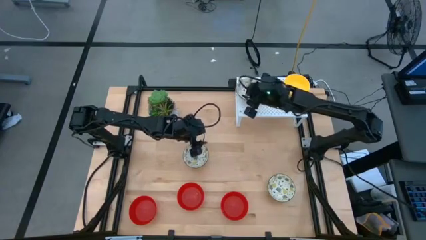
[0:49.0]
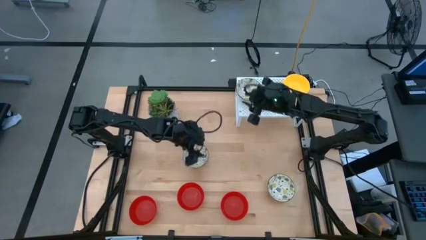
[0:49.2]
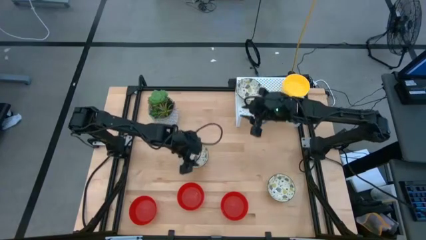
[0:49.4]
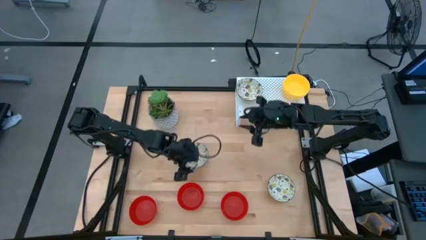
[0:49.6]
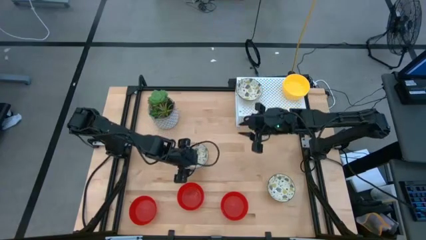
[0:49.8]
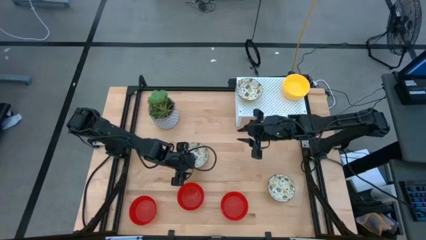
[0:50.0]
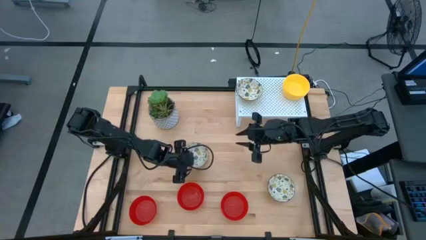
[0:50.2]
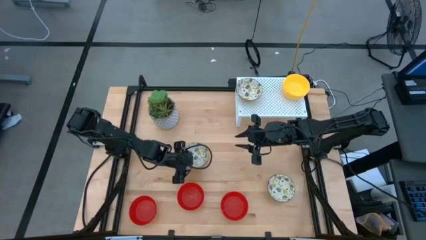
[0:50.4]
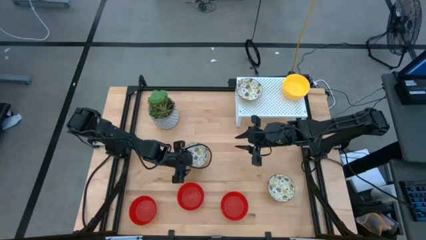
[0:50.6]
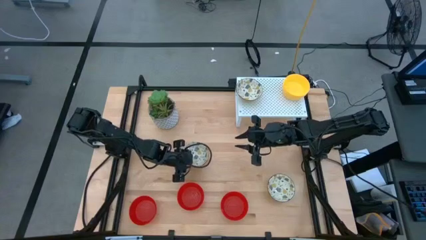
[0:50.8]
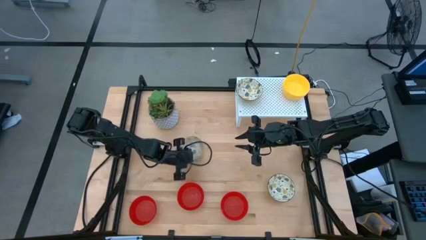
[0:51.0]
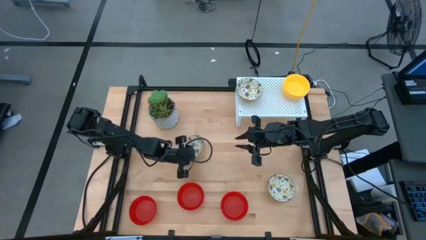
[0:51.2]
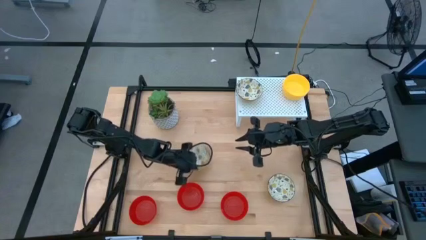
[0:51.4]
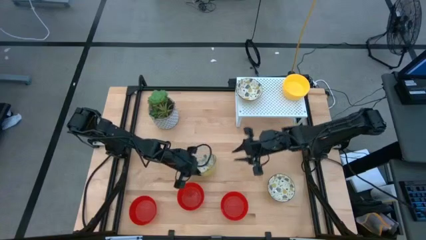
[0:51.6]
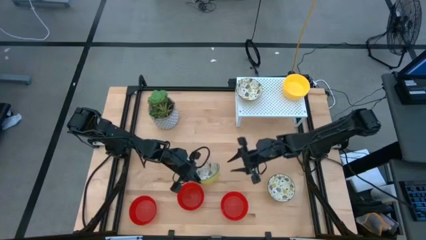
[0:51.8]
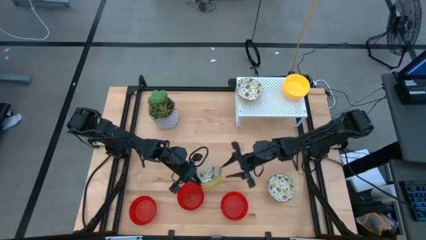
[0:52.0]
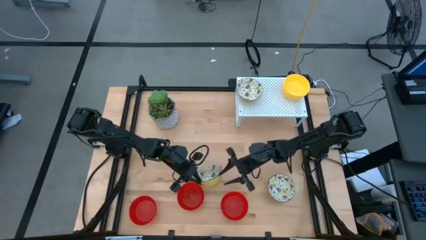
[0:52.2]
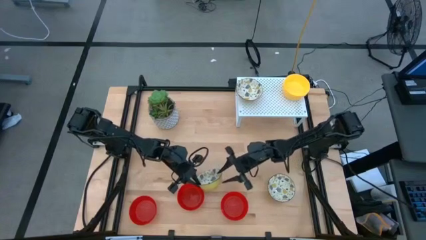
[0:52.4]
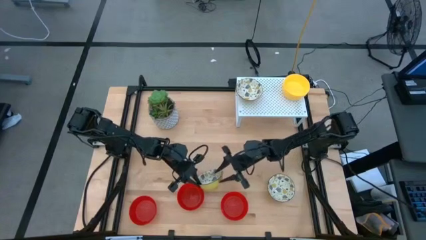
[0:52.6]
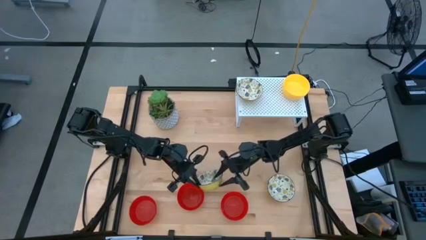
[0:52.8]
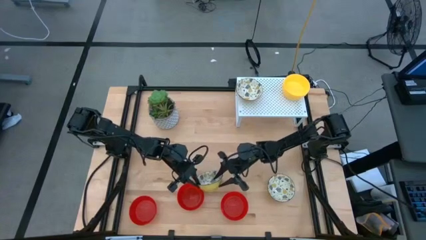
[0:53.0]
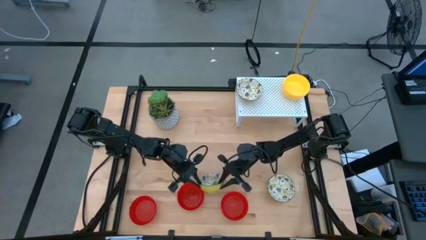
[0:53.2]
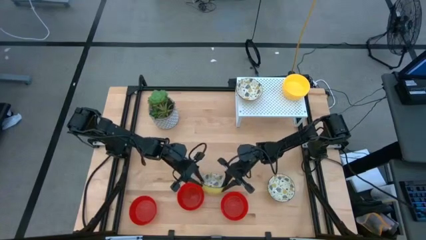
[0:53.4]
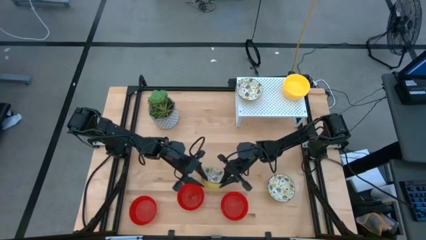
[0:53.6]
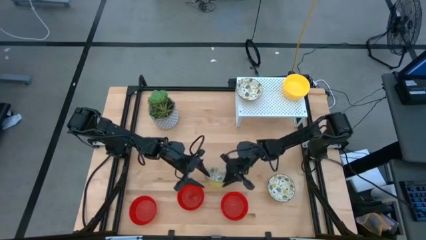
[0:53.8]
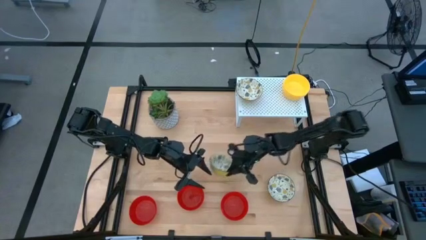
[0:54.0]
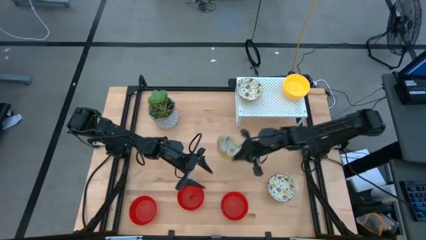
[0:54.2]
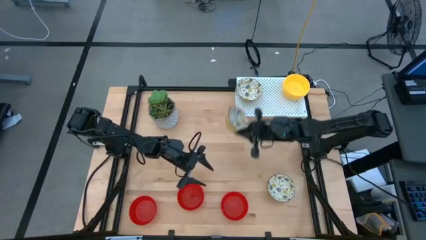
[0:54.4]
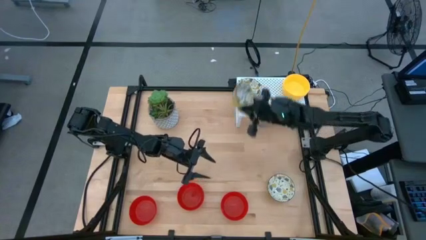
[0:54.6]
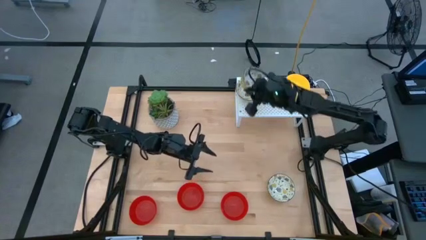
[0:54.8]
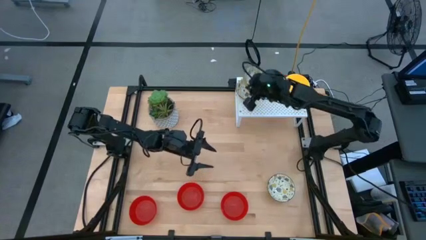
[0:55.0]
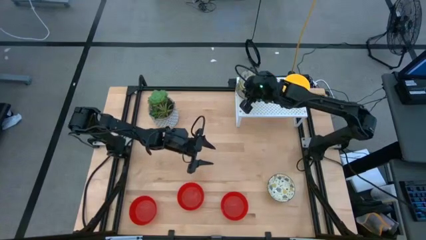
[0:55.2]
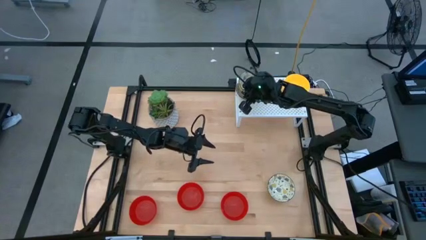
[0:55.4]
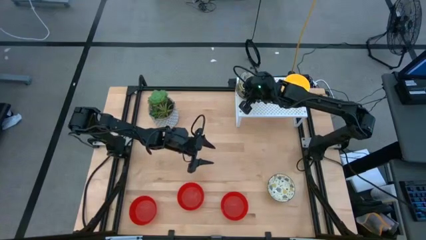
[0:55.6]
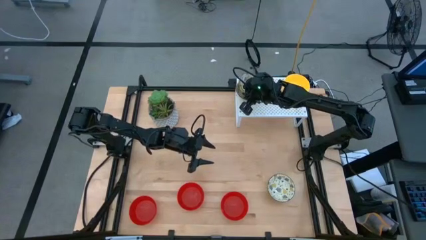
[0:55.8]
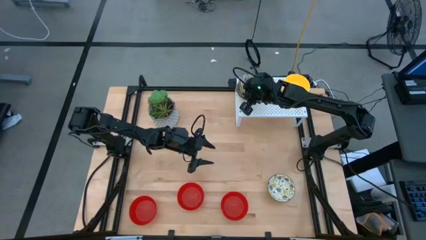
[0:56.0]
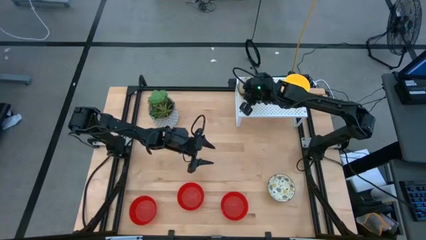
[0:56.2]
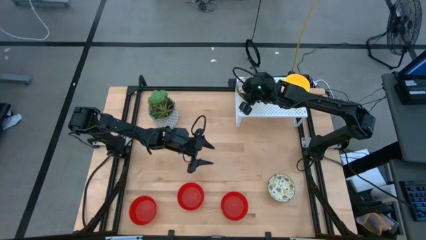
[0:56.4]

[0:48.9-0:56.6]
Task: Pick & Place Mini bowls
Stack the white patterned bowl on the white patterned bowl on the shelf

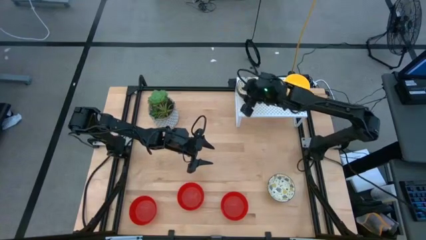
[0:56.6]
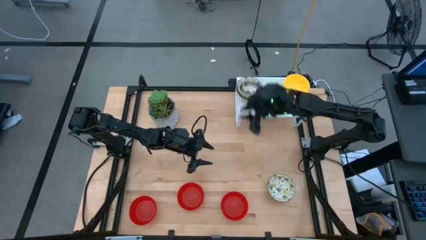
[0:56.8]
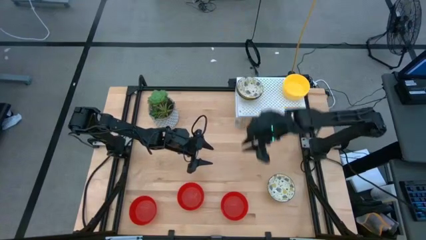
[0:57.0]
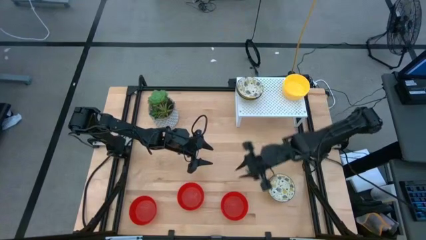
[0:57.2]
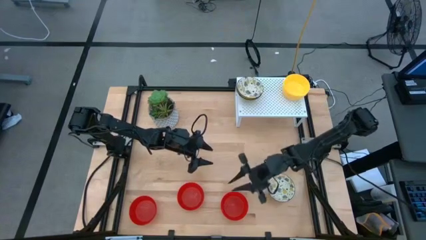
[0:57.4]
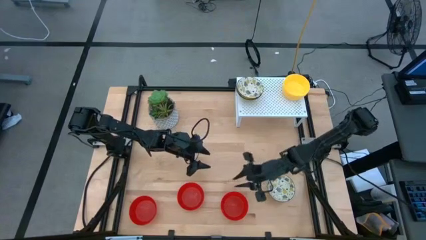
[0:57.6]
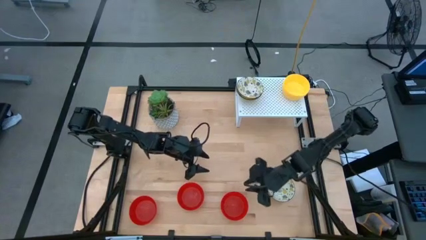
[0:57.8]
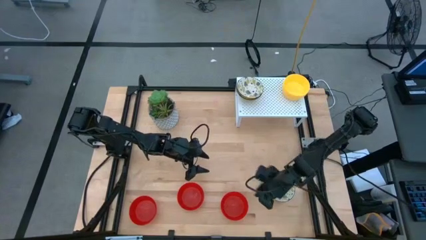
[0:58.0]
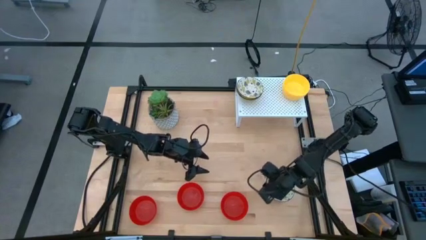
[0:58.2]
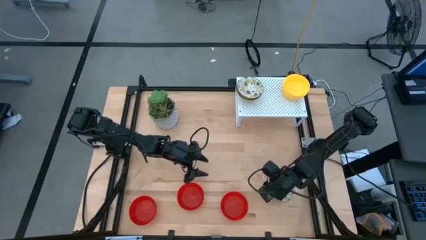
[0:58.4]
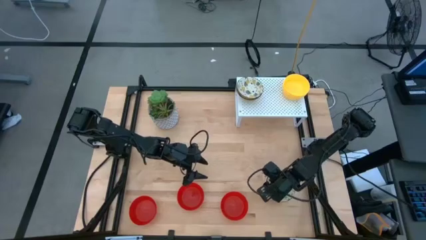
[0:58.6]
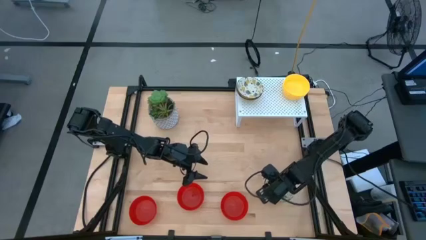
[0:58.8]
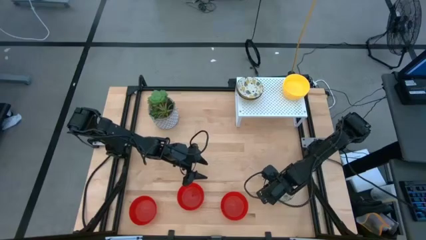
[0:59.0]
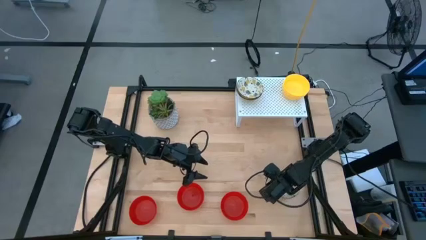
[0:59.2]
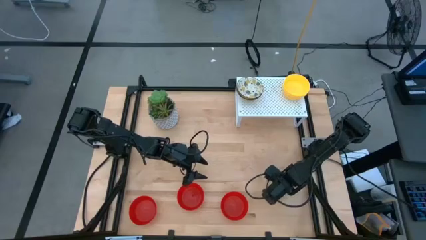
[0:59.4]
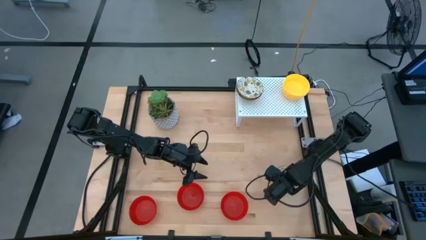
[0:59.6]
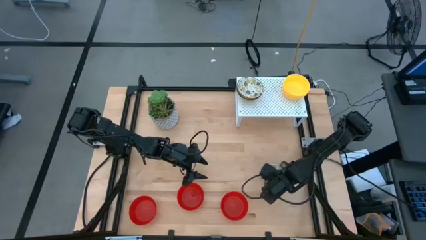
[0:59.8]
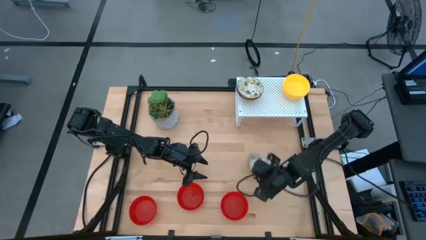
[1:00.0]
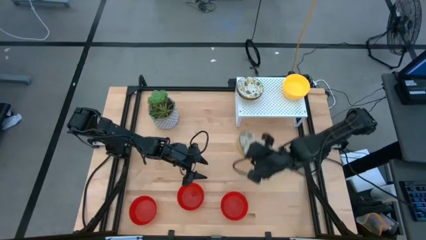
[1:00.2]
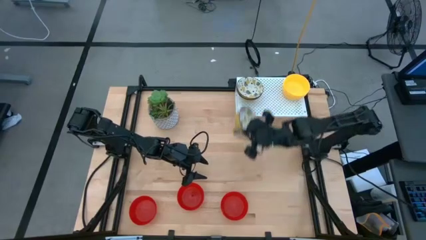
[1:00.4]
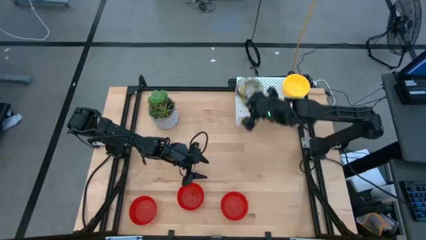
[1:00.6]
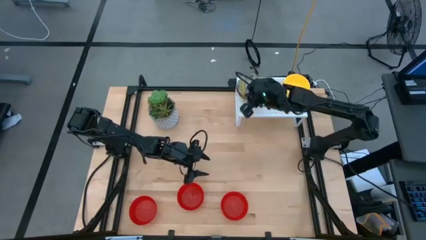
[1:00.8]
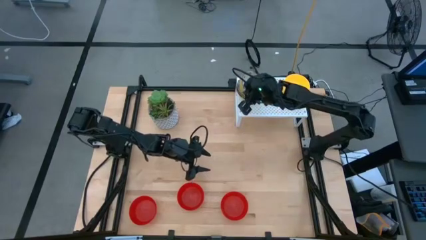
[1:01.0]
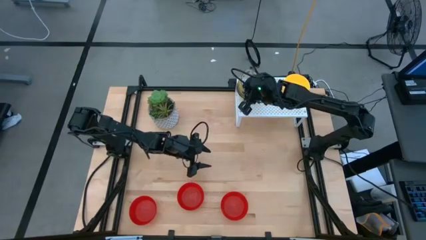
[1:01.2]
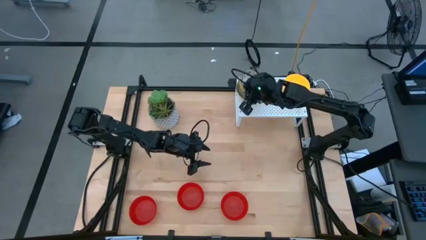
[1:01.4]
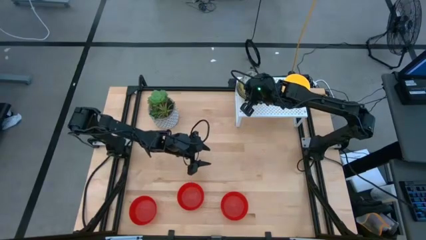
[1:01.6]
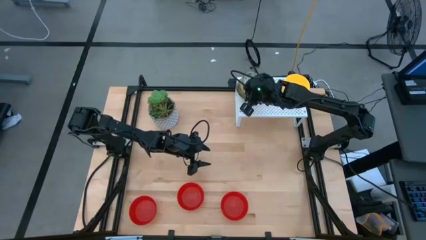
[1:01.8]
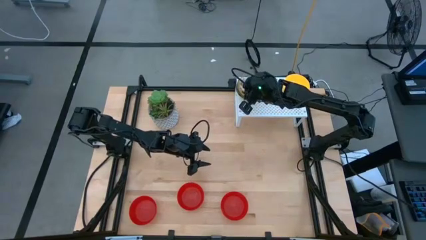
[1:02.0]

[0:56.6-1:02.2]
Stack the white patterned bowl on the white patterned bowls on the shelf

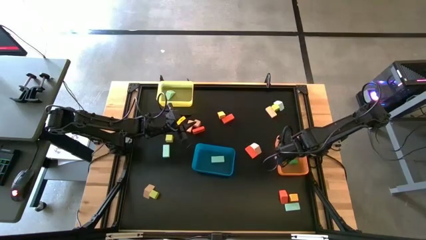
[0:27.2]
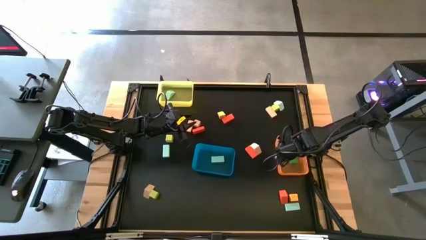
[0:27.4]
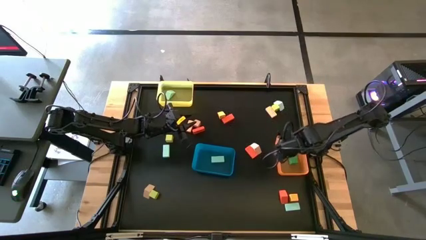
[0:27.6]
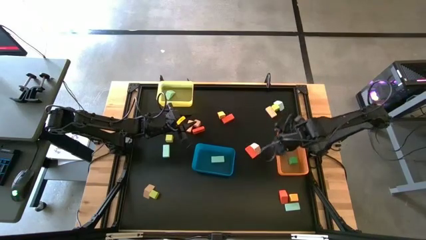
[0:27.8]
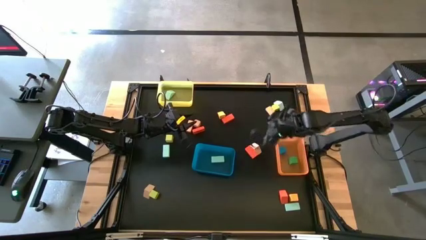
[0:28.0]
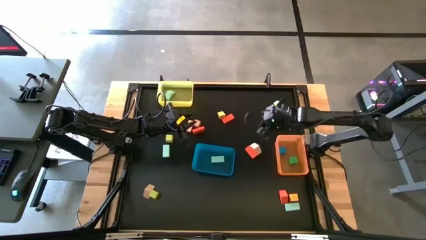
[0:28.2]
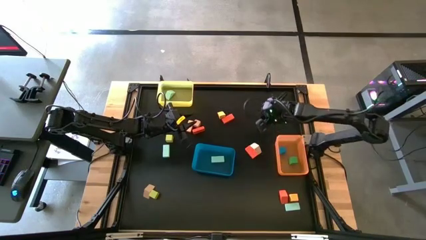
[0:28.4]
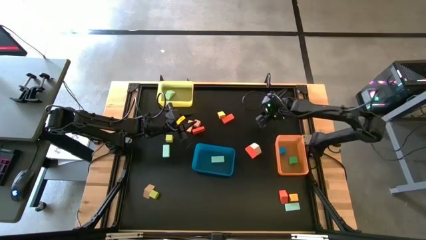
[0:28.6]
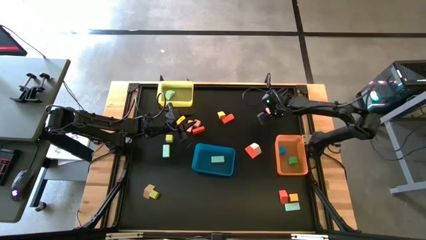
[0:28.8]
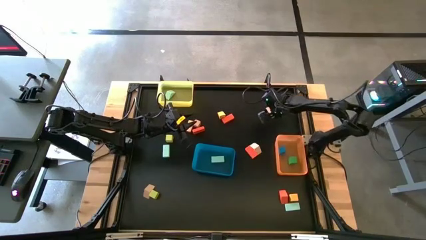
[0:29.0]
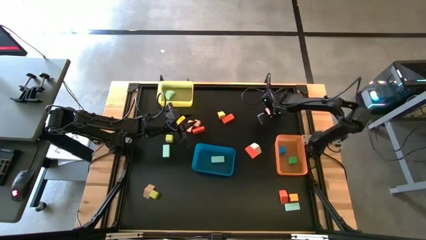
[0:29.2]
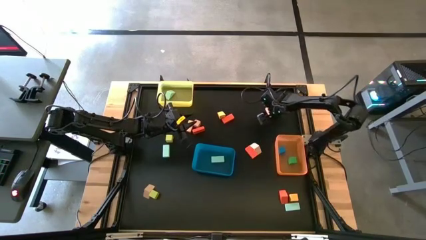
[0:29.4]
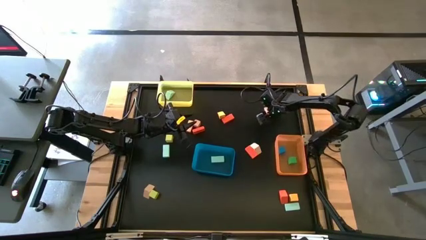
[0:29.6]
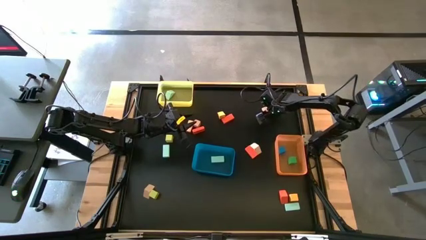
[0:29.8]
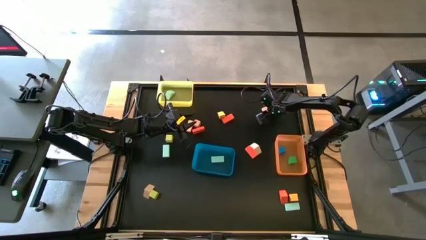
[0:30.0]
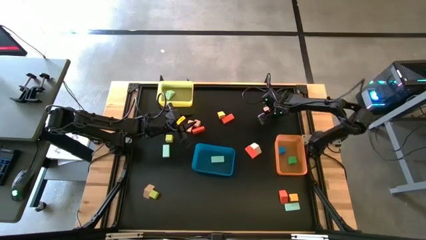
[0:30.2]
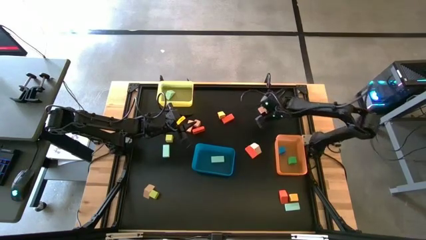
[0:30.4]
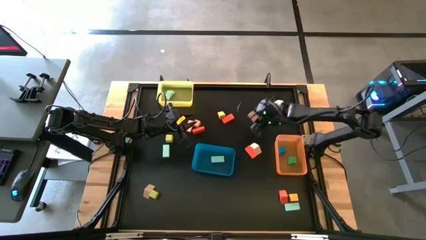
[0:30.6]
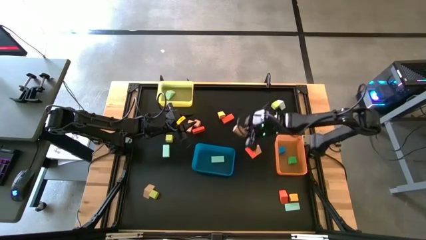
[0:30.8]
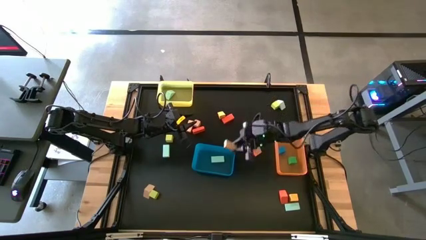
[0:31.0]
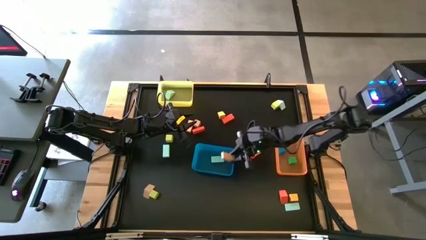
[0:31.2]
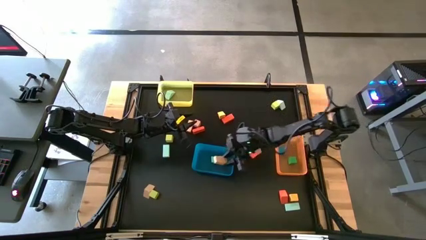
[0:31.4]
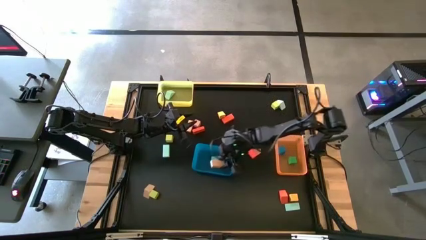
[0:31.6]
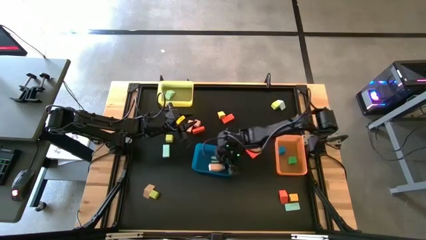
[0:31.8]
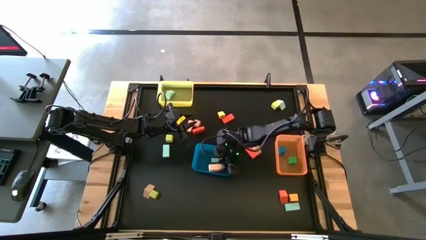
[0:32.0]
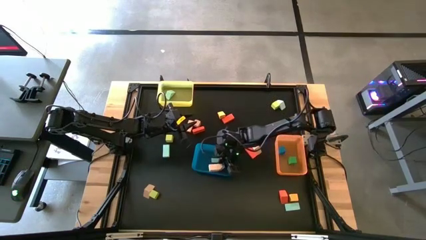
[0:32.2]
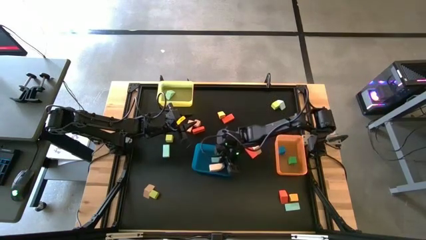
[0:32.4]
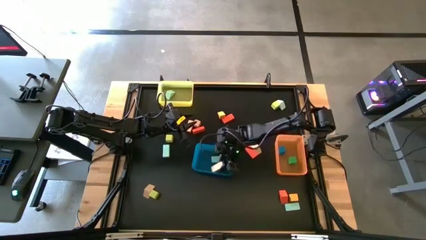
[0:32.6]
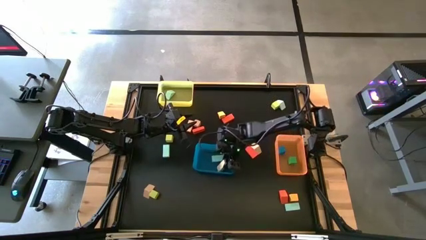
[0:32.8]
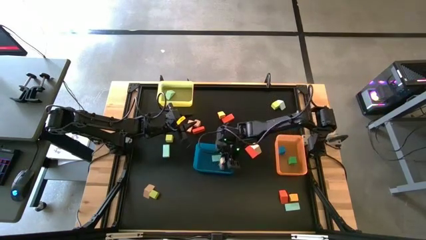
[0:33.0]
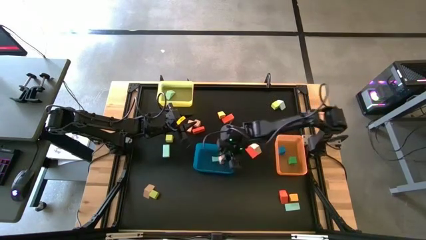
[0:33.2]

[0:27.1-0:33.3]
Task: Sort blocks by size
Put the light orange rectangular block into the blue bin
